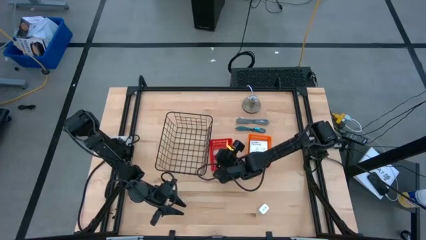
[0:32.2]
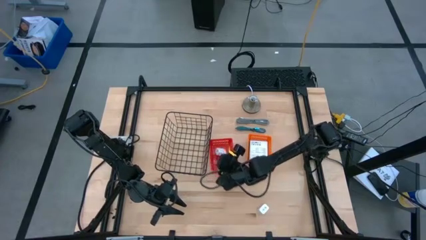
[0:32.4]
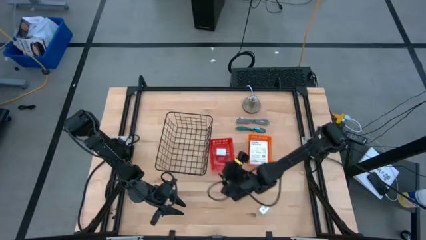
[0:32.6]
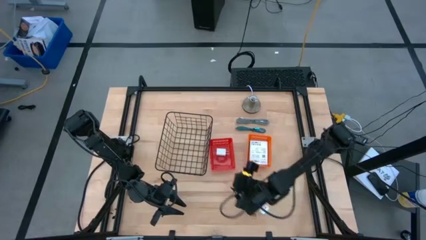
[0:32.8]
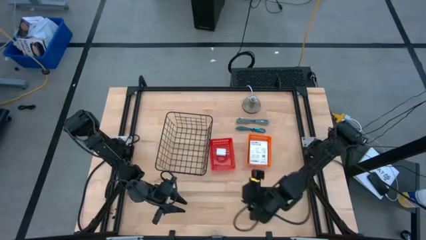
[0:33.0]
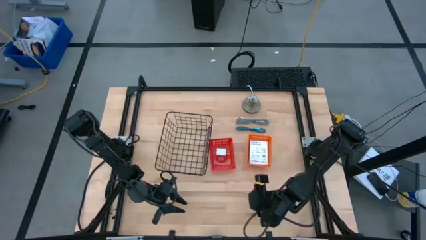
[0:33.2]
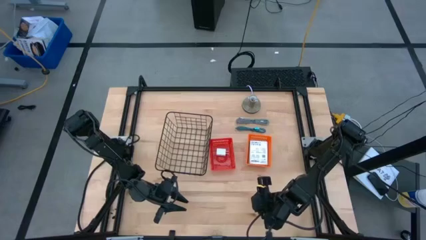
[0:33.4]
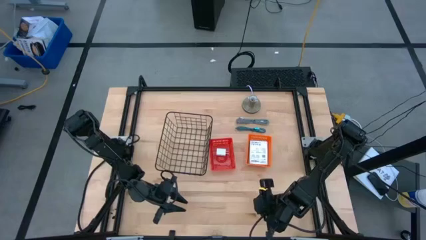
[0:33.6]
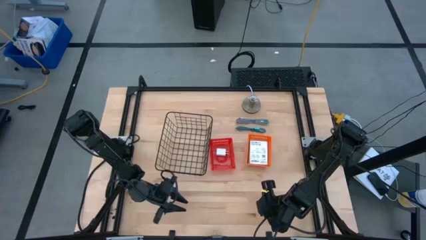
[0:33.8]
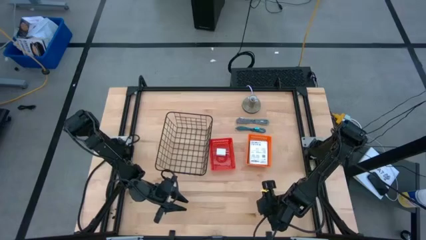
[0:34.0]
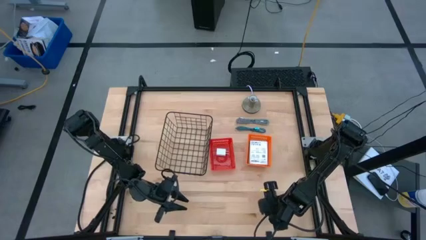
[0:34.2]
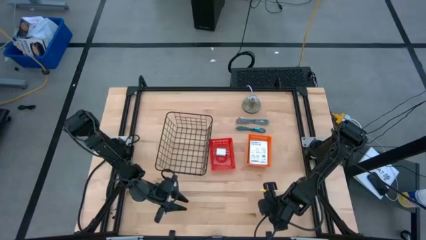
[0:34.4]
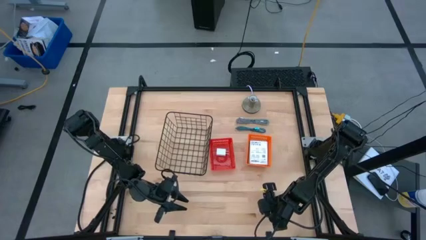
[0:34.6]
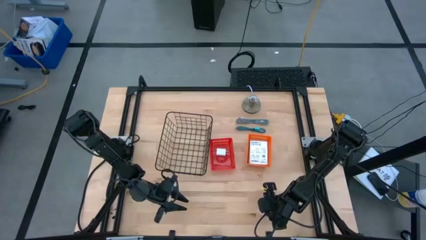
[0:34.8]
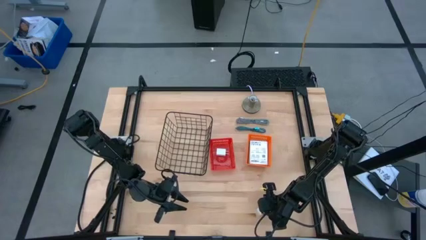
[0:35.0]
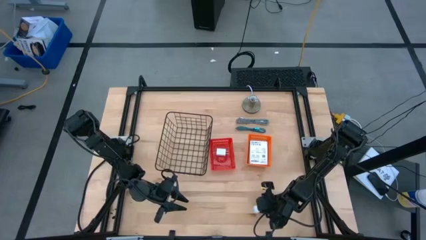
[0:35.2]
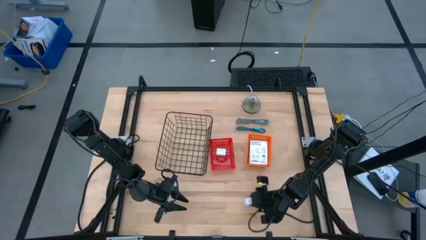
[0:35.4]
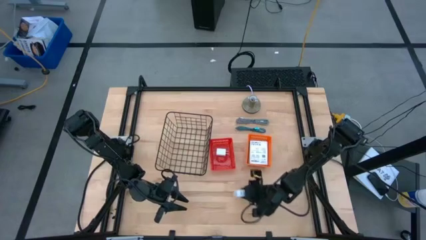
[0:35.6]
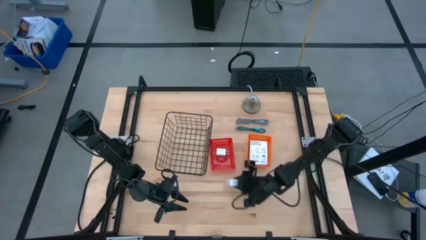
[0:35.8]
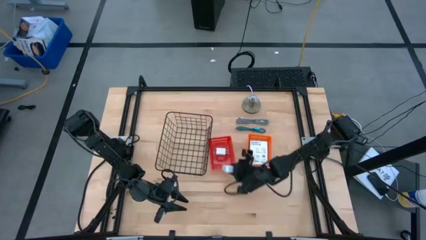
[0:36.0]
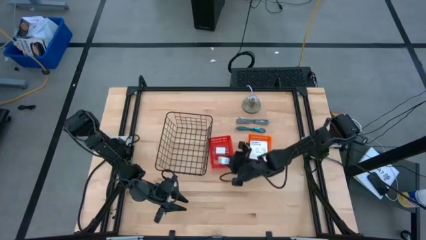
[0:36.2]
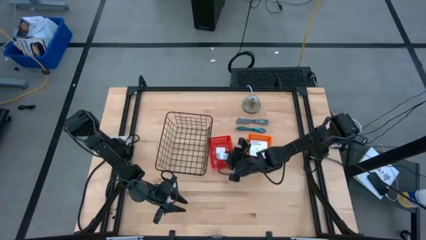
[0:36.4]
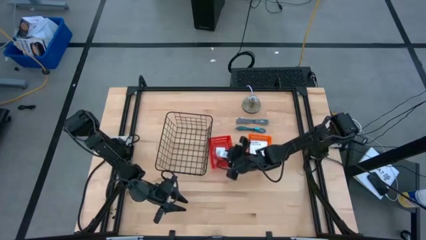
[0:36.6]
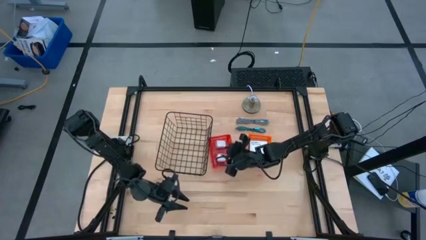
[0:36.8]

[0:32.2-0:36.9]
Task: Pick and place items into bin
Put the white charger adapter into the red basket

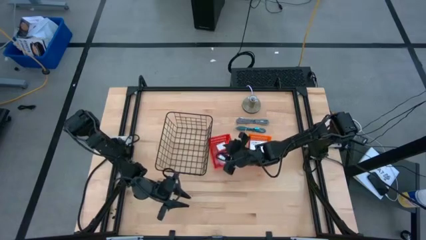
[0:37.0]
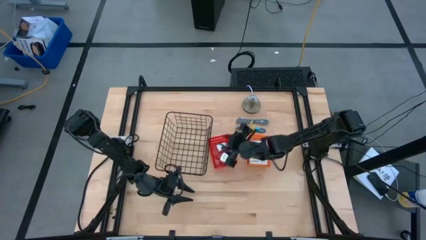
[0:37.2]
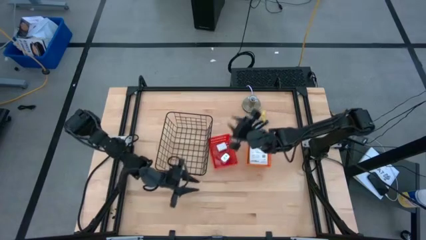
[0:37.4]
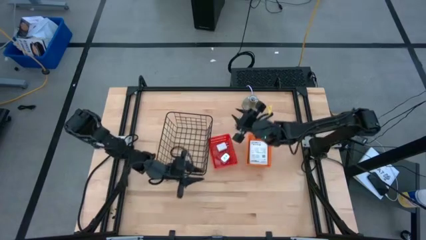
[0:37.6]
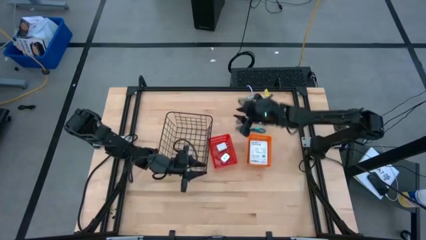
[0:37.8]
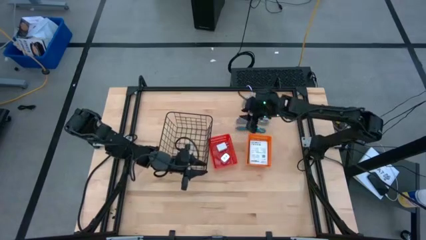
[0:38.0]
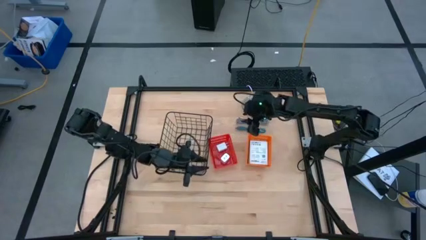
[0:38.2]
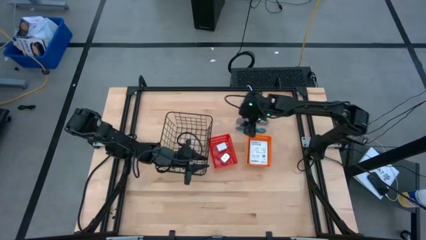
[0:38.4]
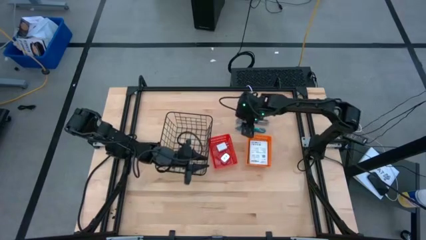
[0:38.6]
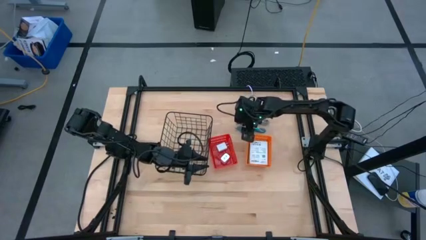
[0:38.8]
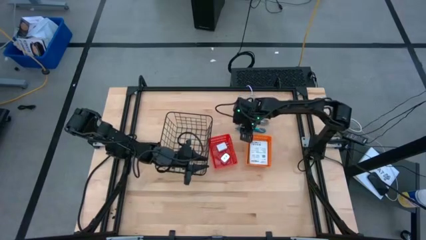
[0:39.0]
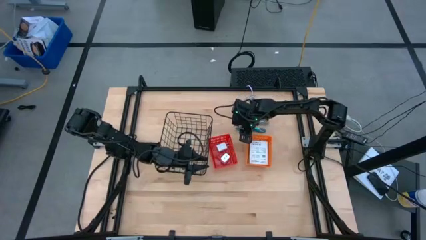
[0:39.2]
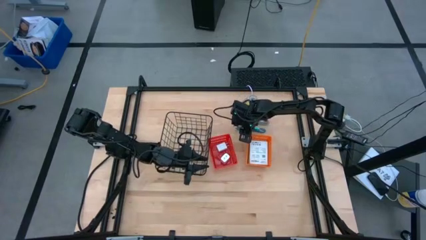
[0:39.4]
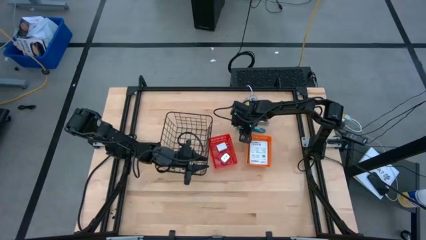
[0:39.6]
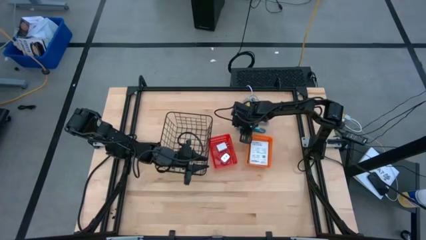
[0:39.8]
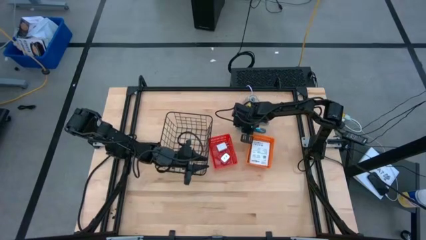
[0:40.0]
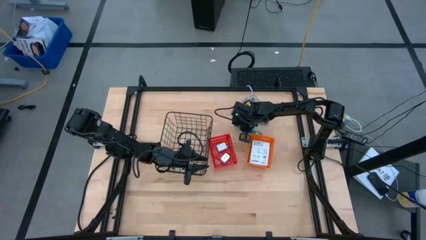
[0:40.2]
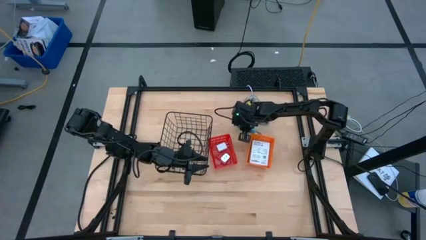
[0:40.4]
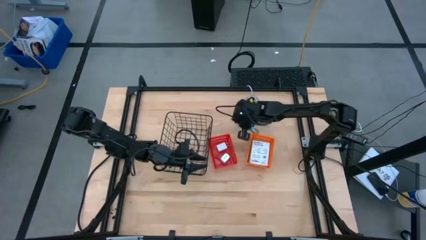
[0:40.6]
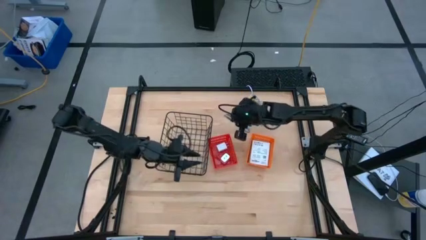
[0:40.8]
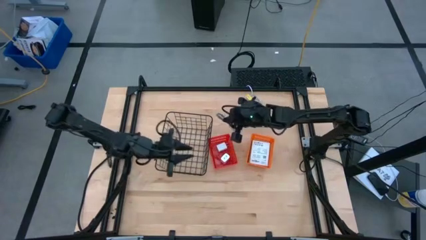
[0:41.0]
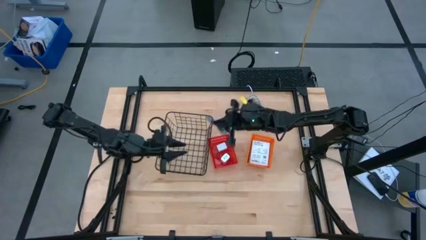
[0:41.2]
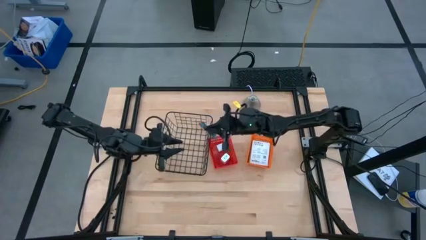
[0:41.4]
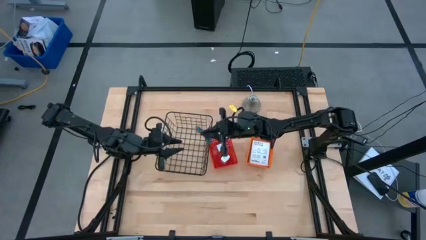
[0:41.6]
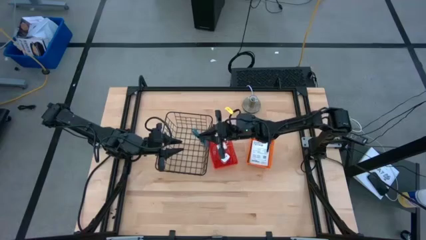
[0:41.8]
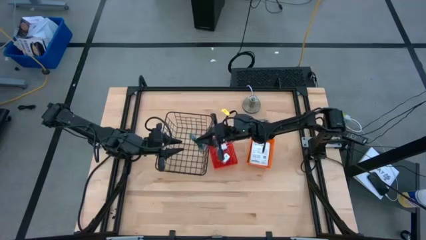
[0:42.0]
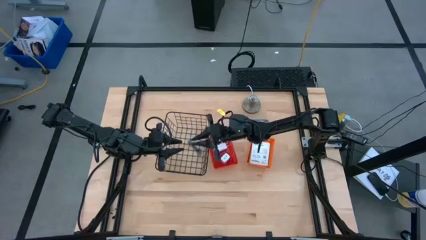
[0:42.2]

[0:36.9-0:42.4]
Put the blue charger cable into the wire basket

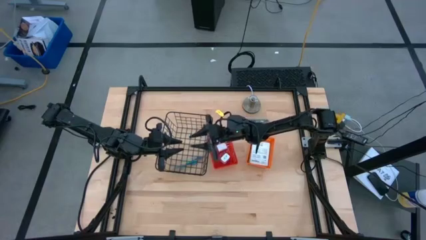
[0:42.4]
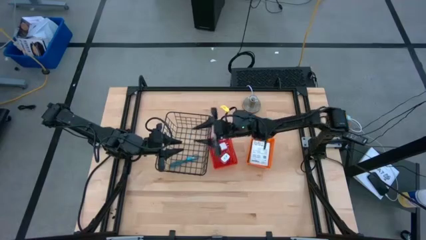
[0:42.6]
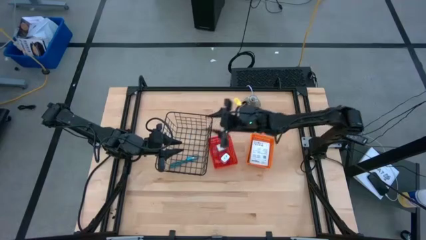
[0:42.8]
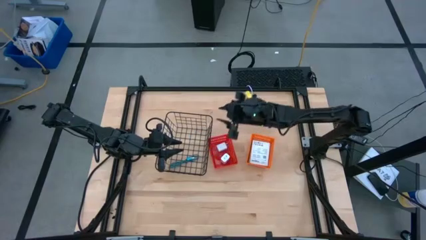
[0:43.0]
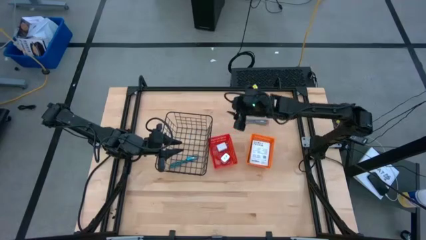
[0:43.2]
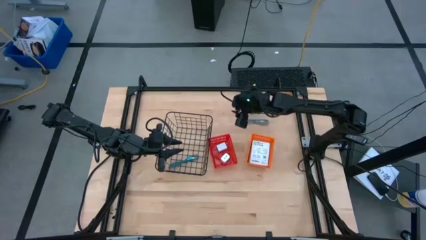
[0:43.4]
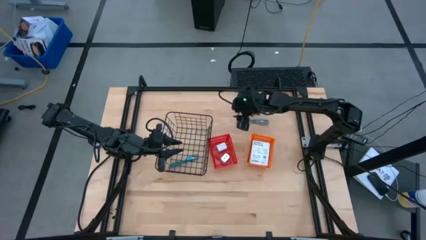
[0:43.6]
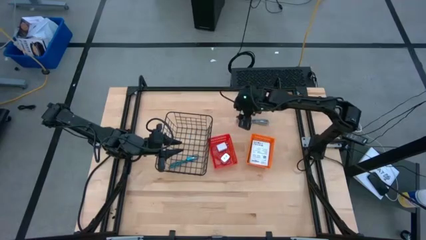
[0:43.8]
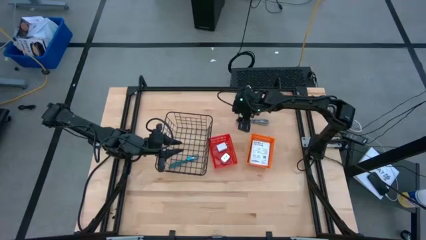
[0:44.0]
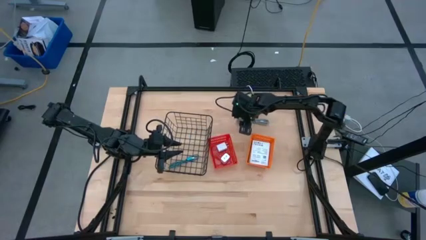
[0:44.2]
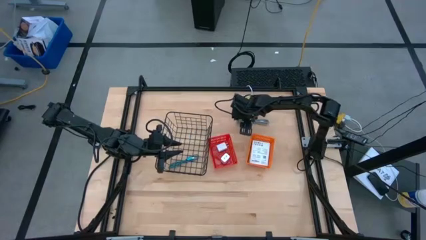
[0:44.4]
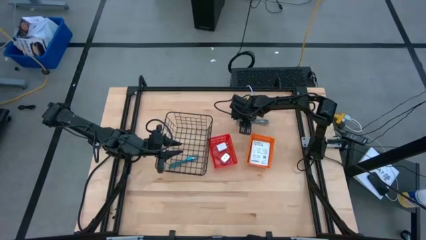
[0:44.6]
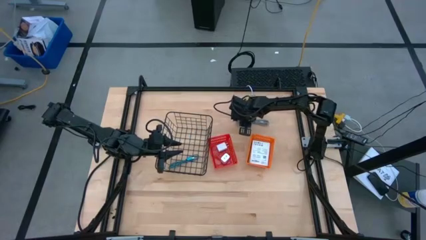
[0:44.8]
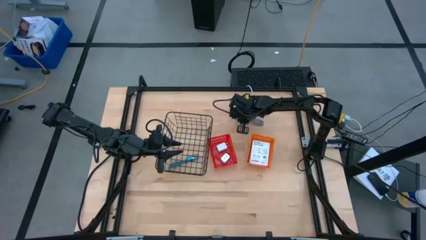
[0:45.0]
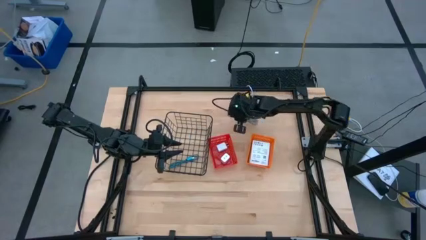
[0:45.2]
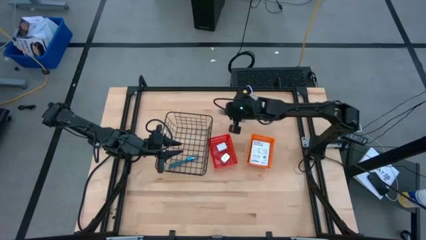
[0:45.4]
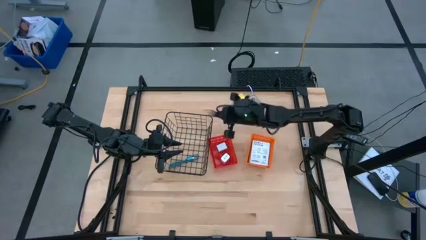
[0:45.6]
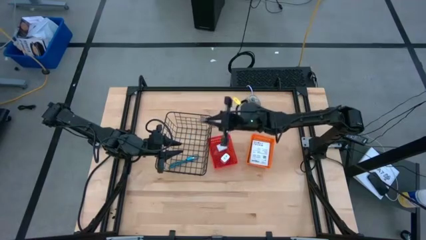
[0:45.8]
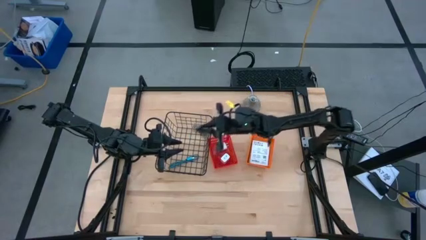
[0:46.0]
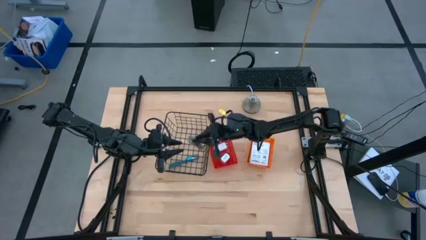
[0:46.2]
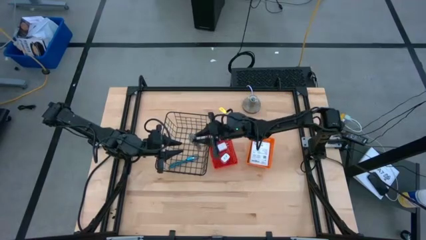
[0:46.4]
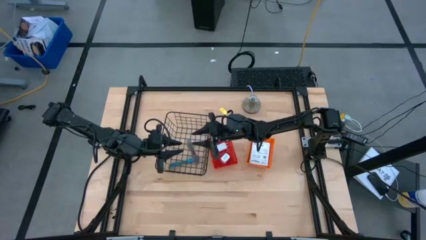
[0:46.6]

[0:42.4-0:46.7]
Put the white charger cable into the wire basket

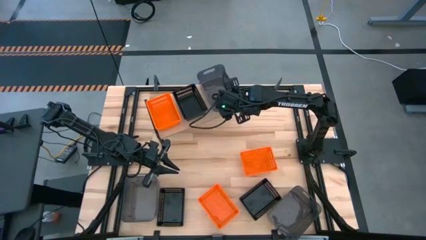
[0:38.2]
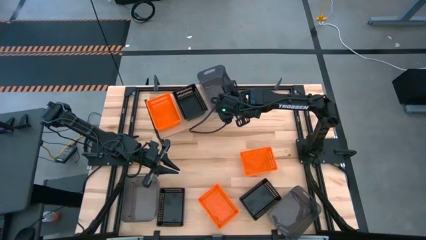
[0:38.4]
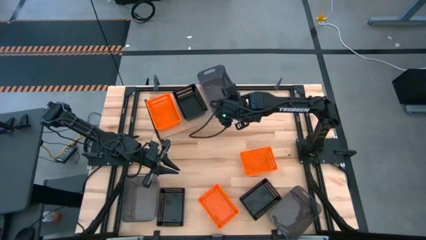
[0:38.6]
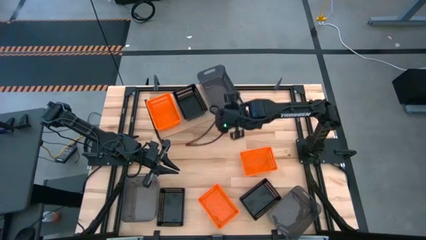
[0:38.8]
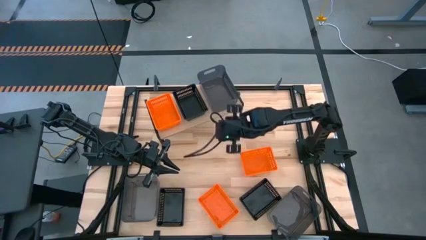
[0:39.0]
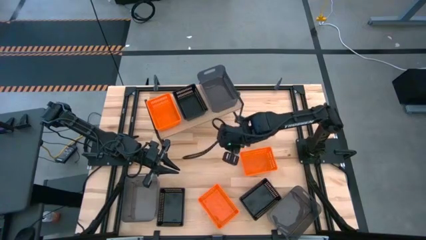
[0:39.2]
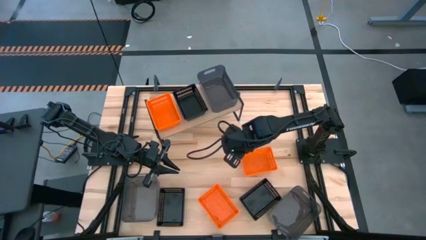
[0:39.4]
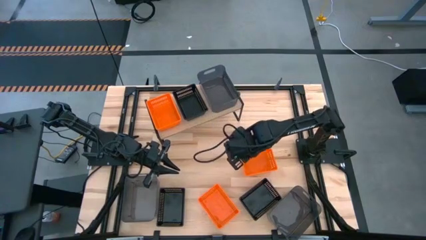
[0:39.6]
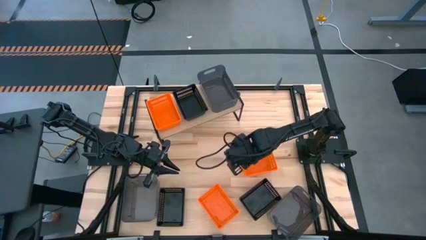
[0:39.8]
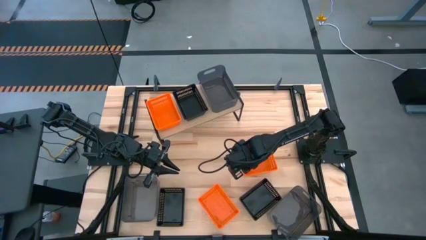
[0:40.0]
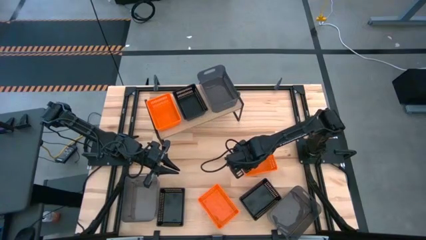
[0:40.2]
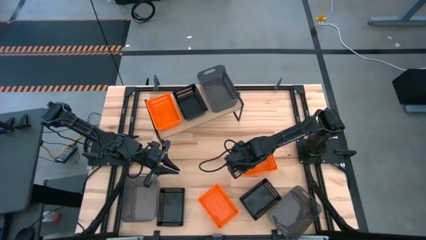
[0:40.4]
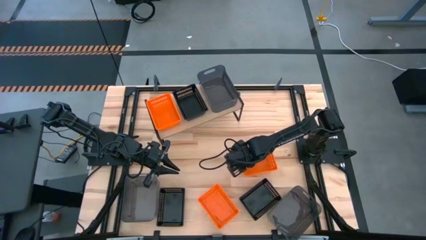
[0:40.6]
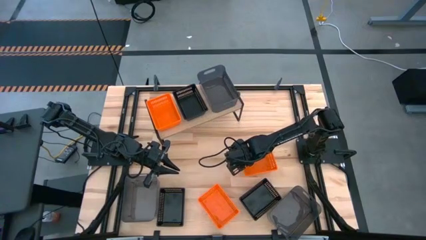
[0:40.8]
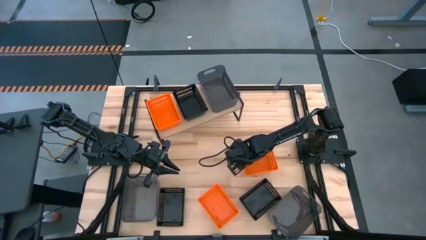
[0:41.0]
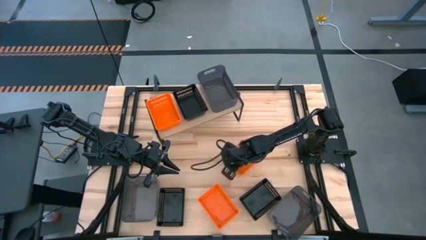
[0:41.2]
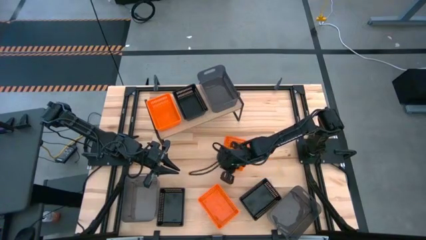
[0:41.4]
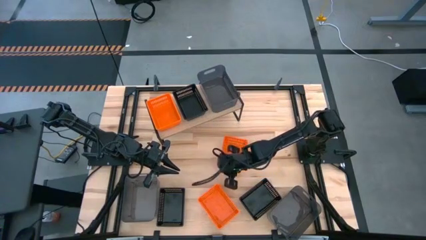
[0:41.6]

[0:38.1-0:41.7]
Task: Stack baskets on shelf by color
Stack the top orange bin on top of the orange bin on the shelf
